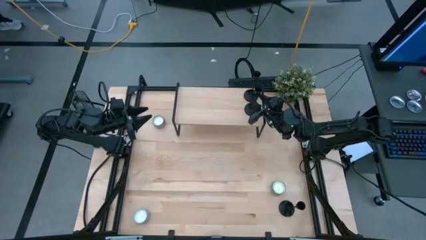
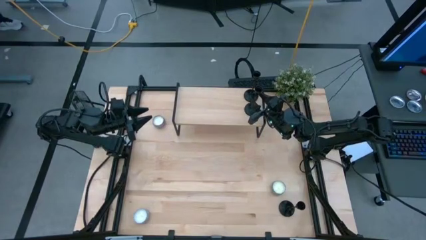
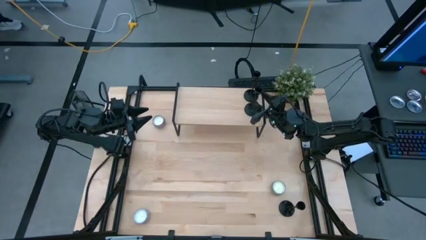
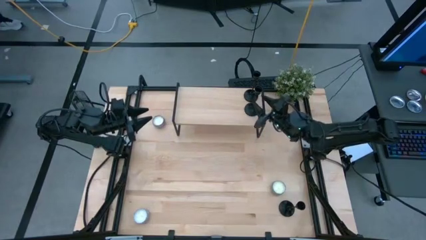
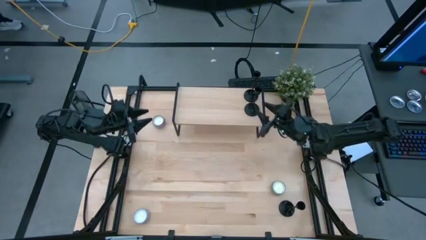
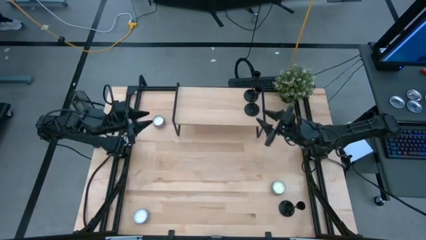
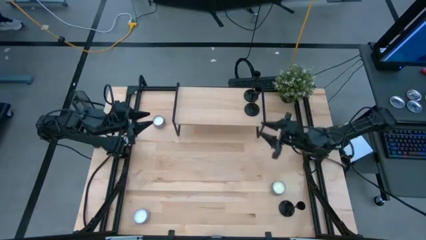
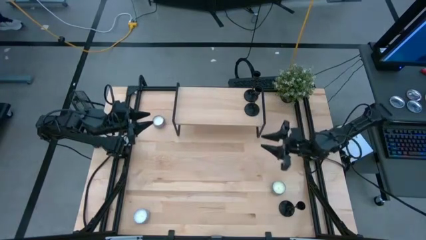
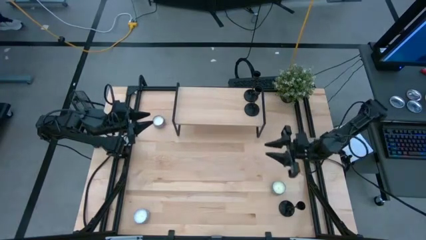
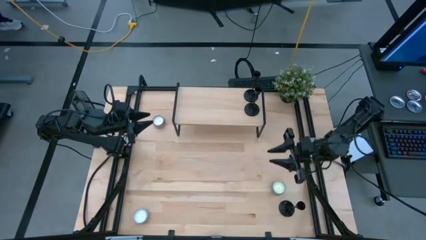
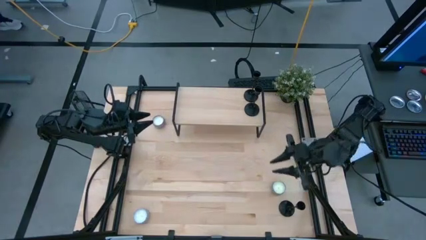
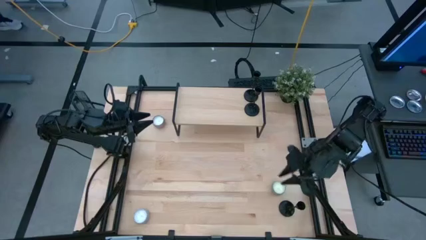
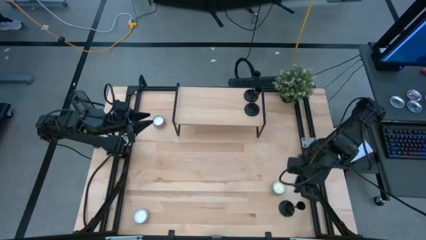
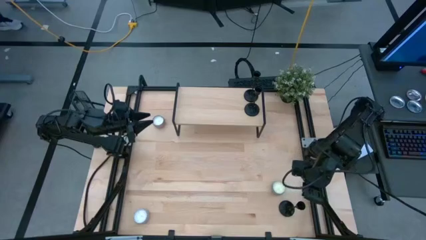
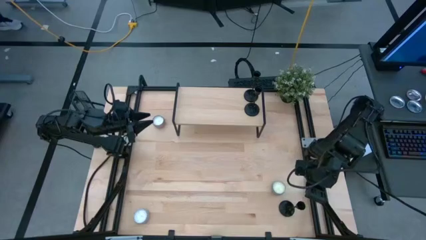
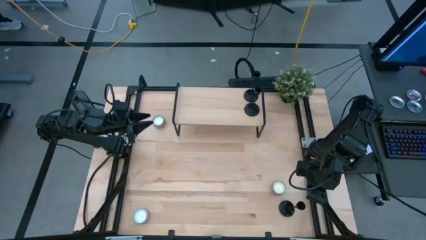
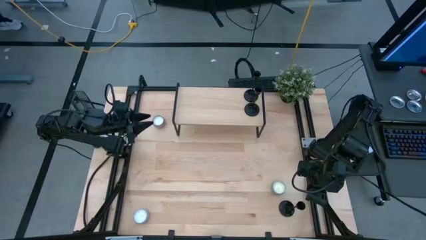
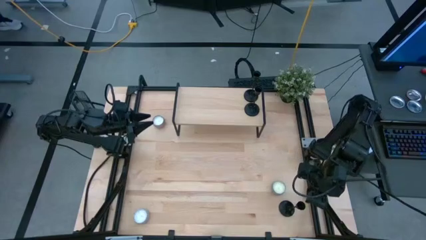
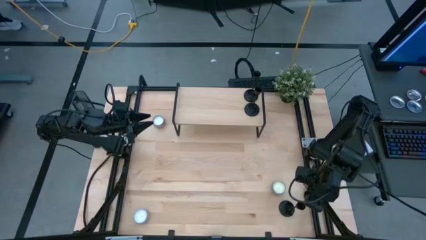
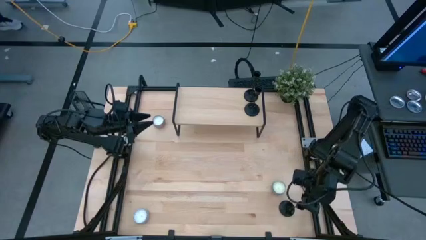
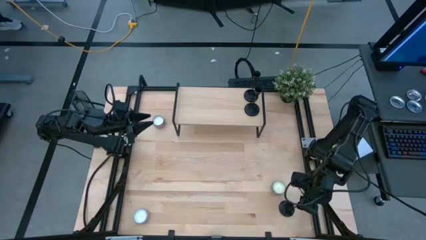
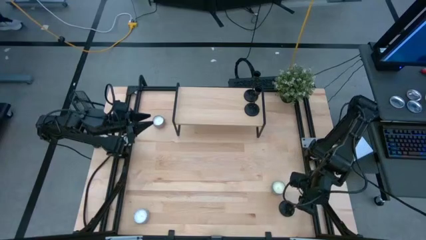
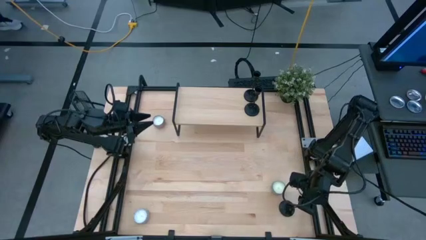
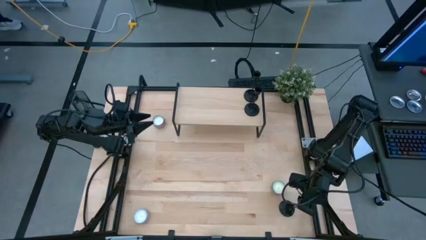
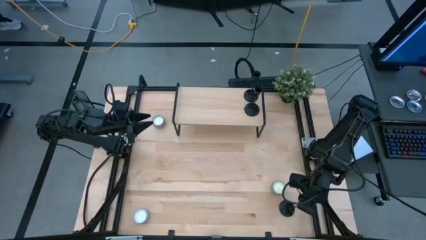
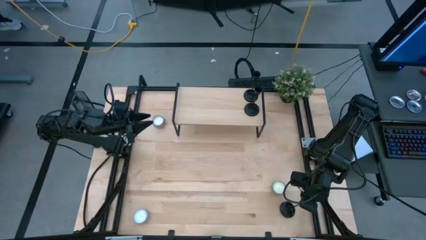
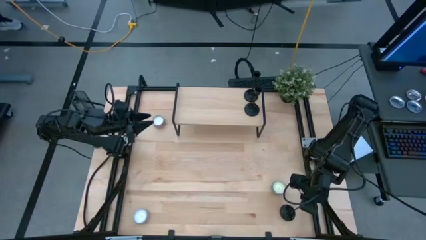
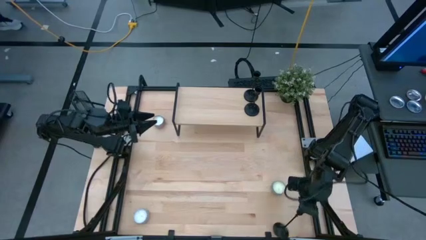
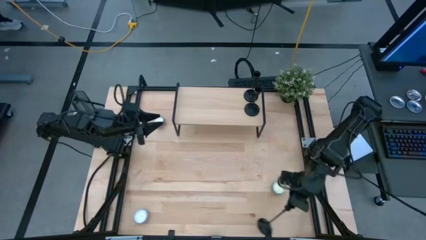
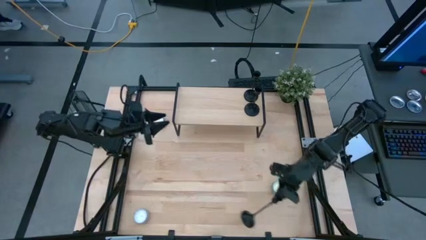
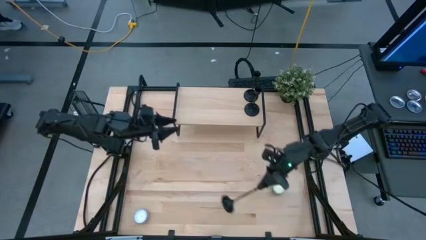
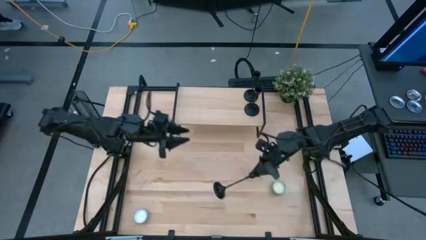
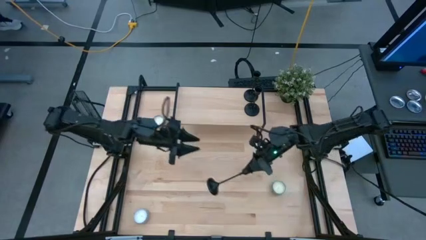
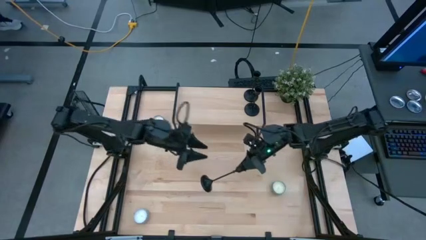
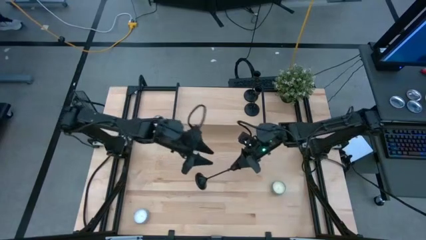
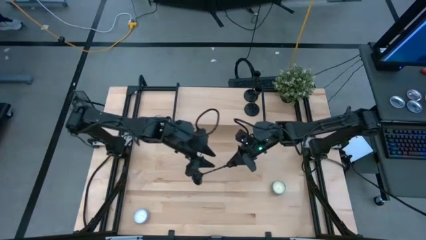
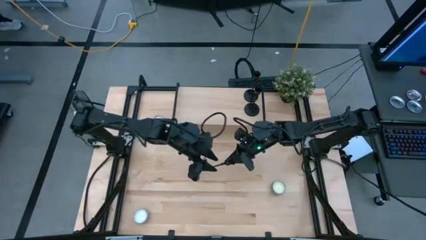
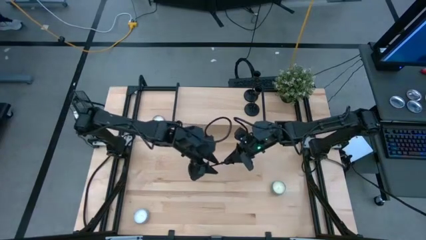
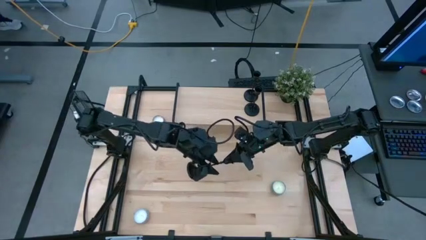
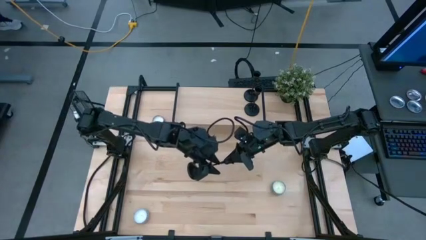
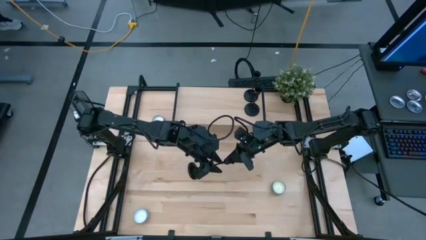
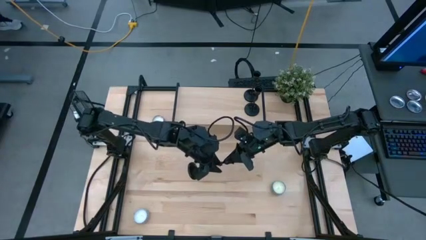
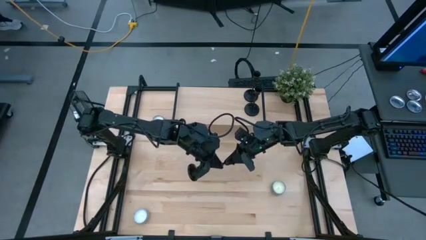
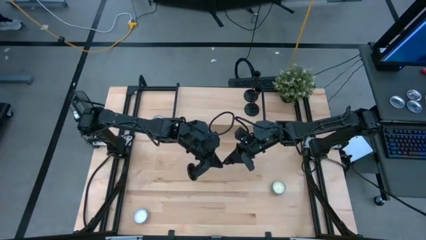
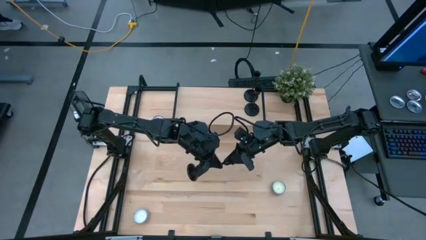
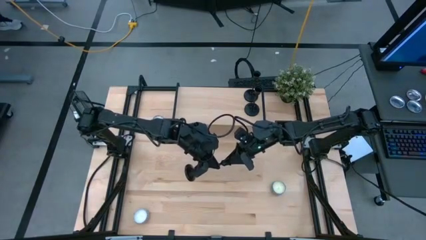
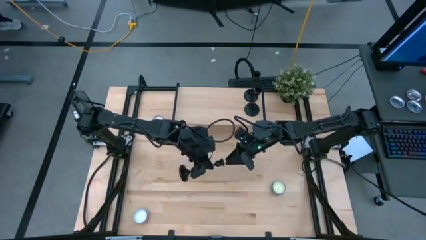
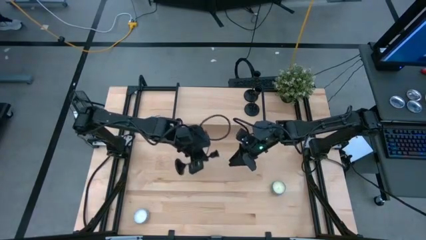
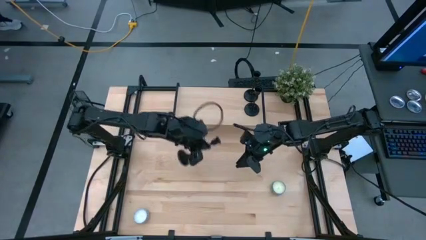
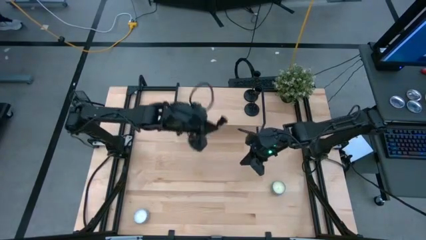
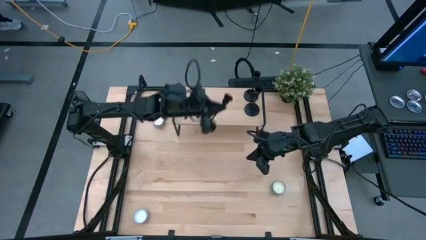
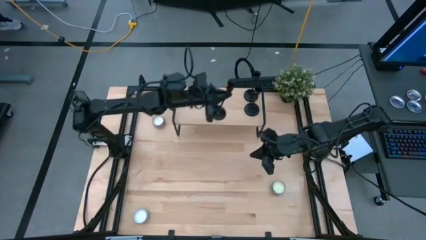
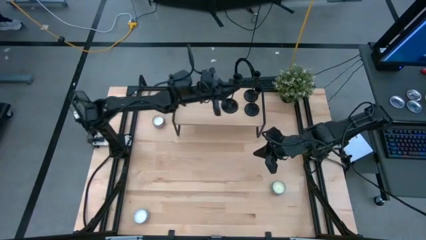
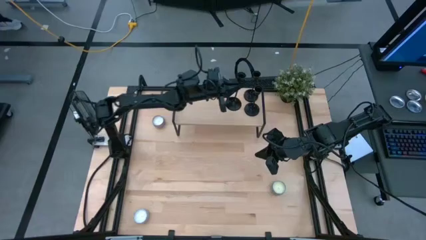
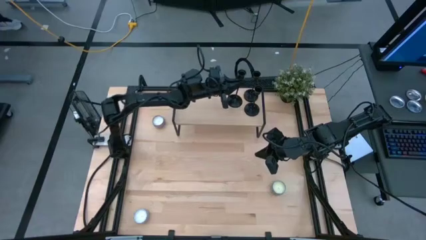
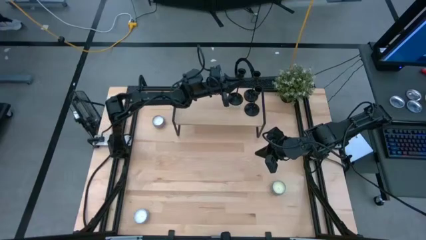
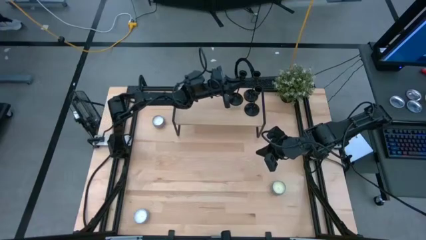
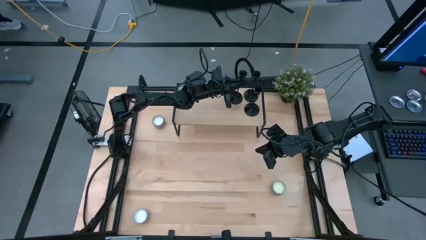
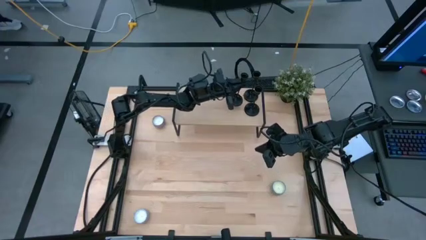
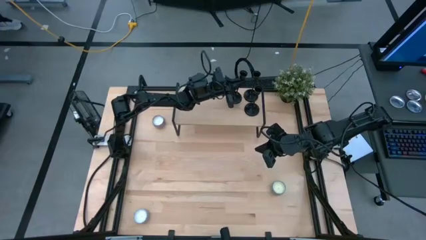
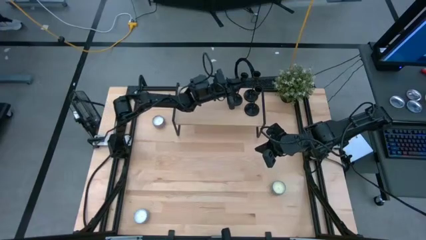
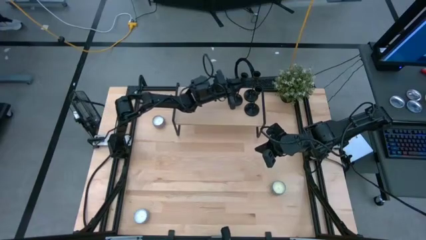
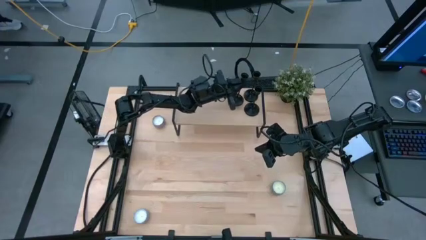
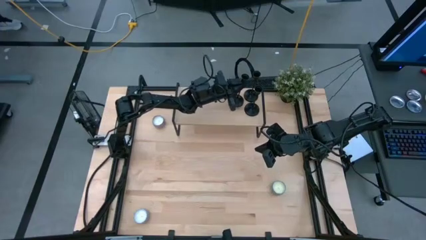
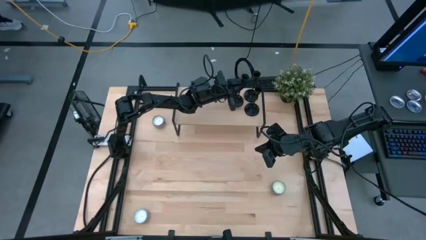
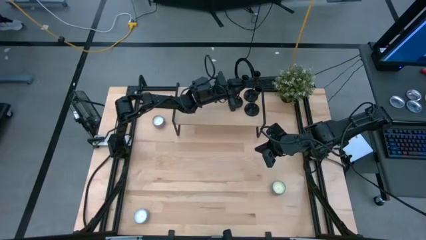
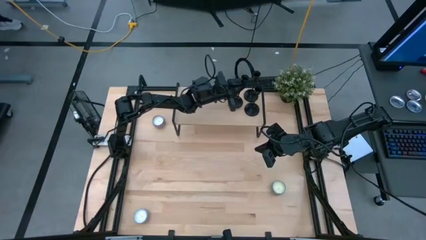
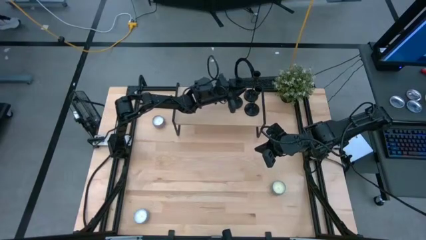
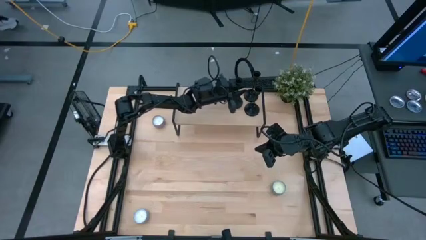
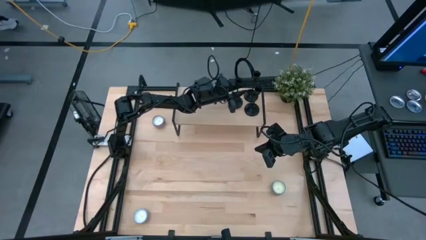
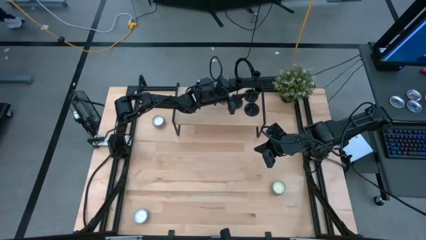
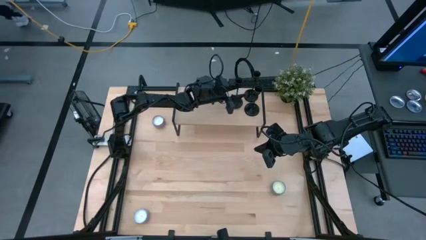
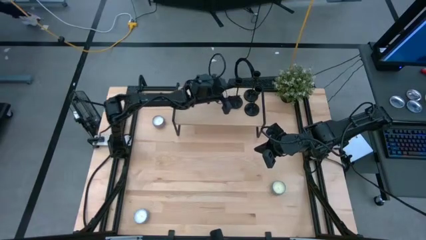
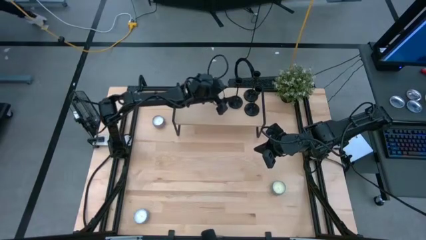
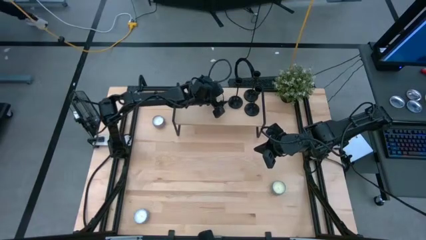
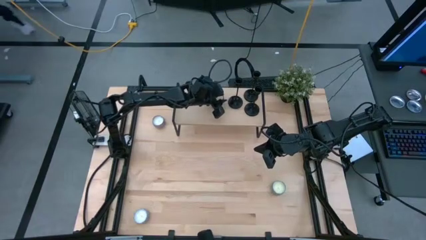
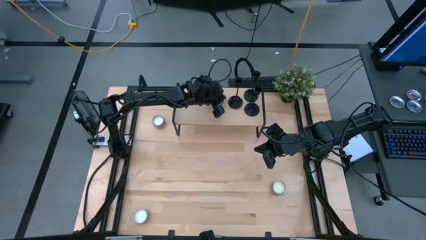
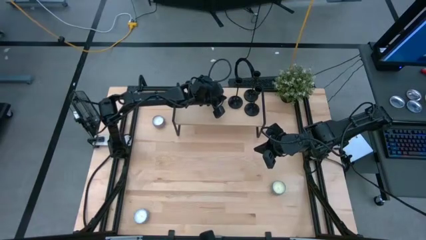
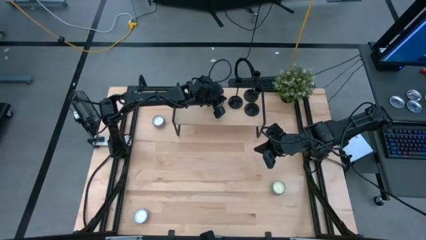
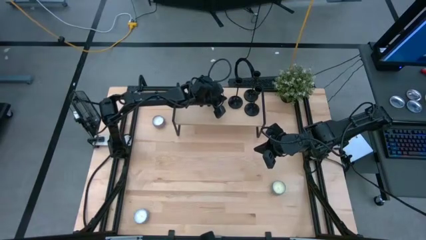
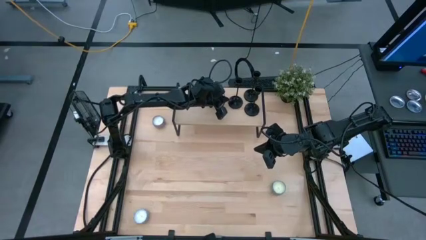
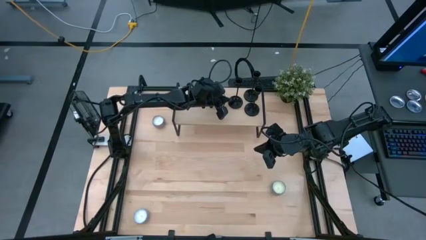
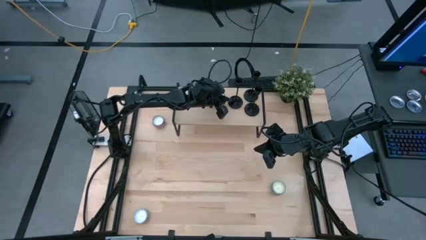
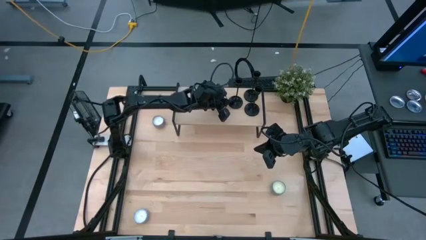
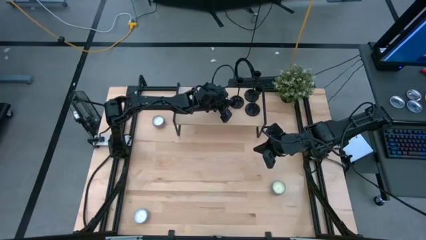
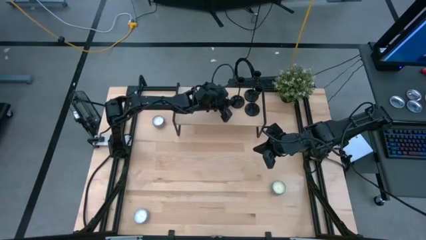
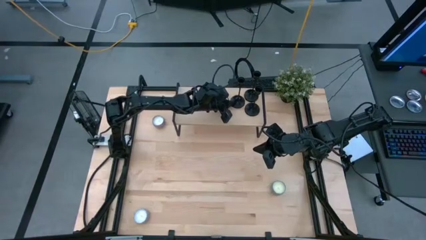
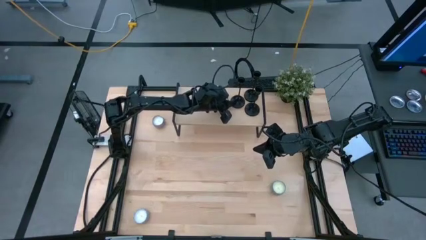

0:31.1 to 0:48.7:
Task: Pick & Place candle stick holders
Put the black candle holder on the shelf
